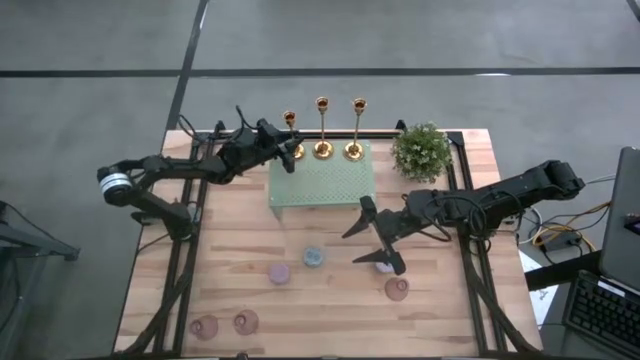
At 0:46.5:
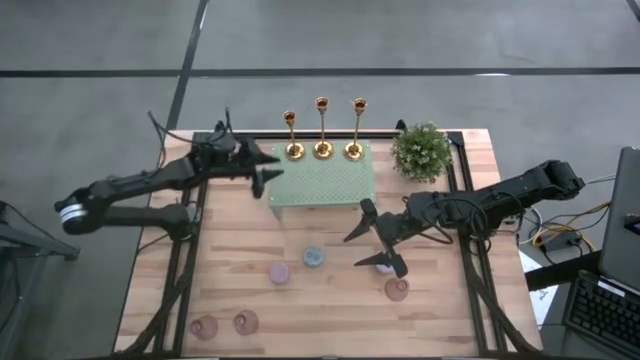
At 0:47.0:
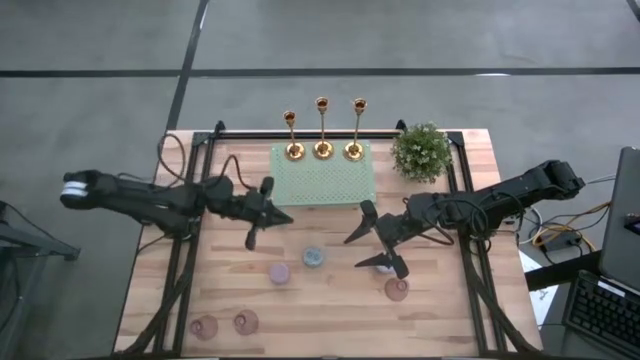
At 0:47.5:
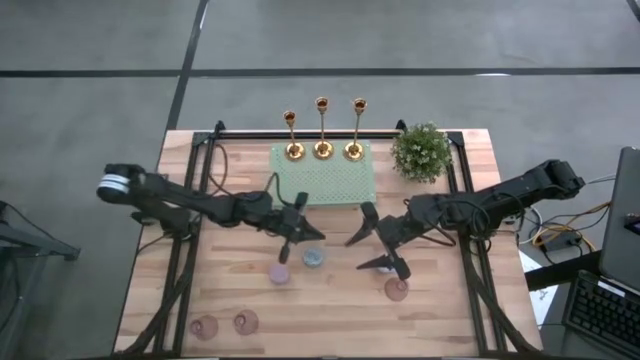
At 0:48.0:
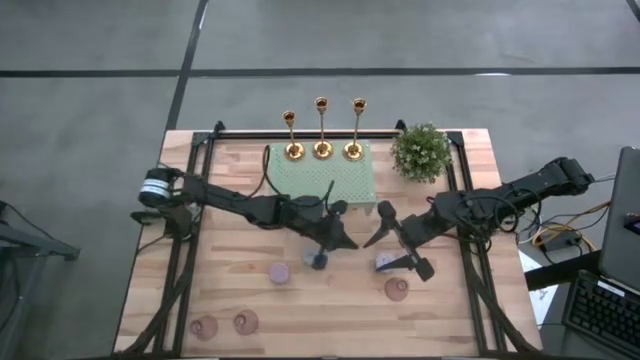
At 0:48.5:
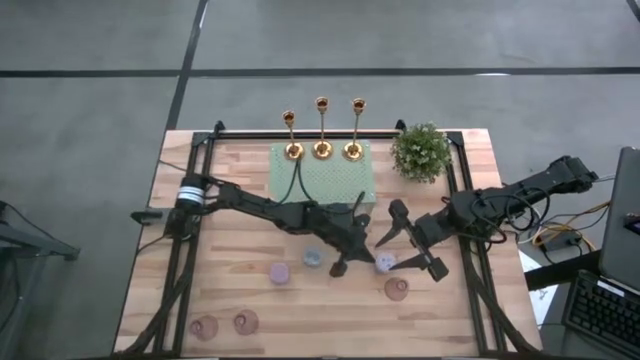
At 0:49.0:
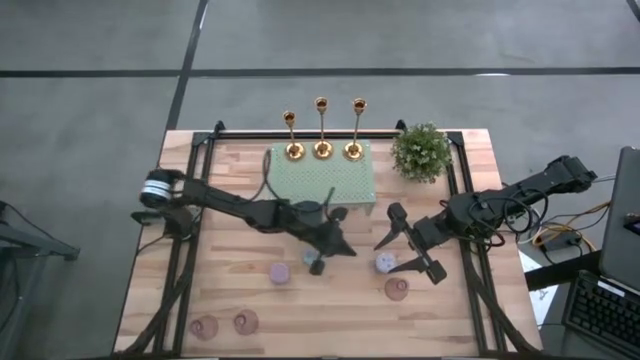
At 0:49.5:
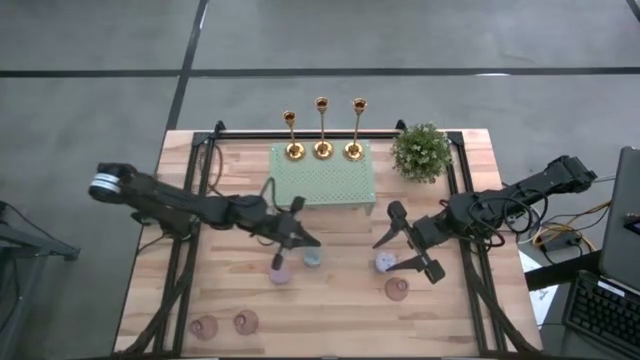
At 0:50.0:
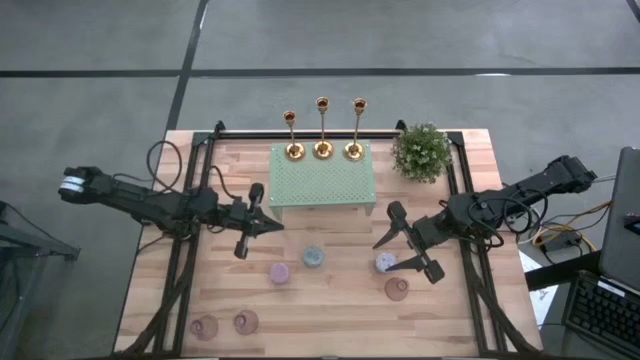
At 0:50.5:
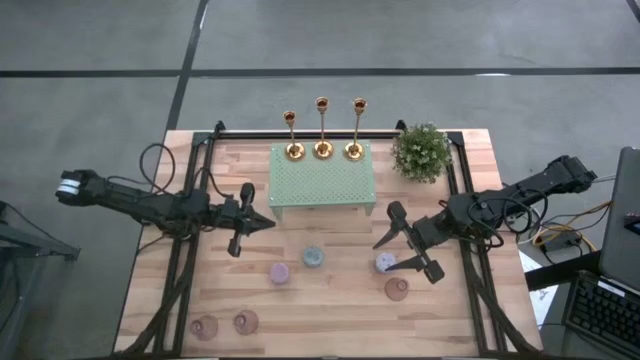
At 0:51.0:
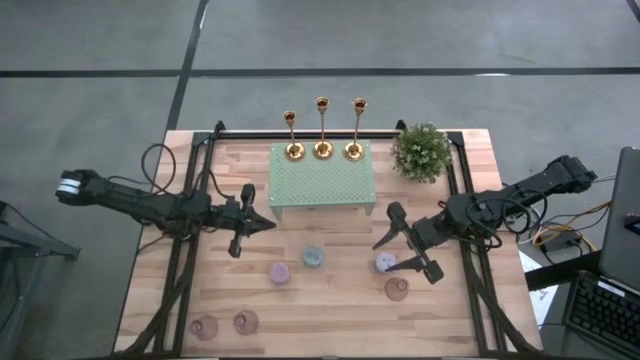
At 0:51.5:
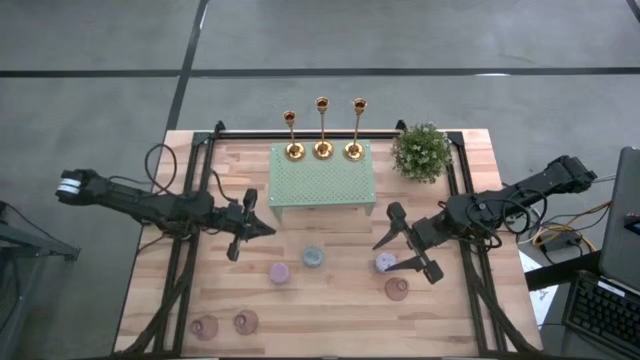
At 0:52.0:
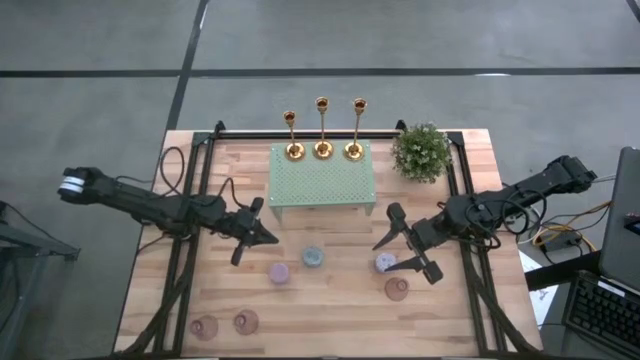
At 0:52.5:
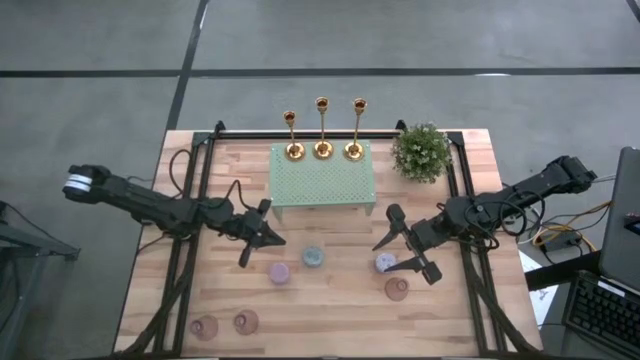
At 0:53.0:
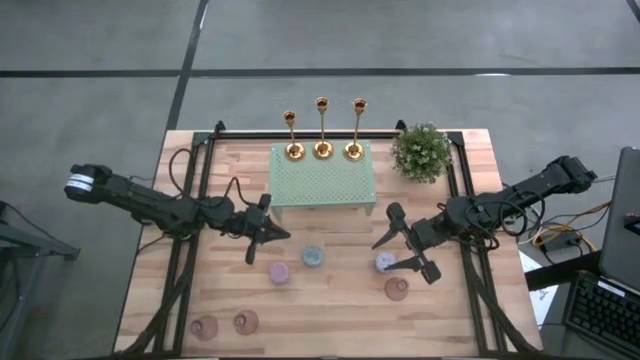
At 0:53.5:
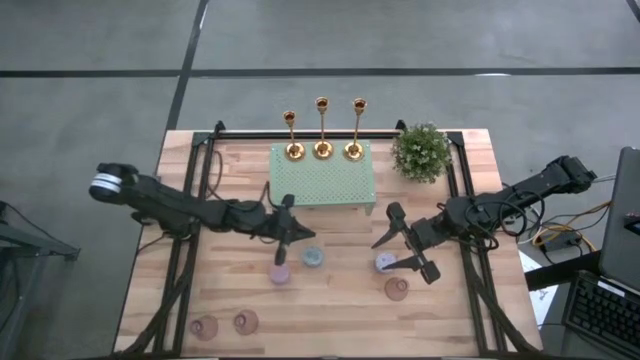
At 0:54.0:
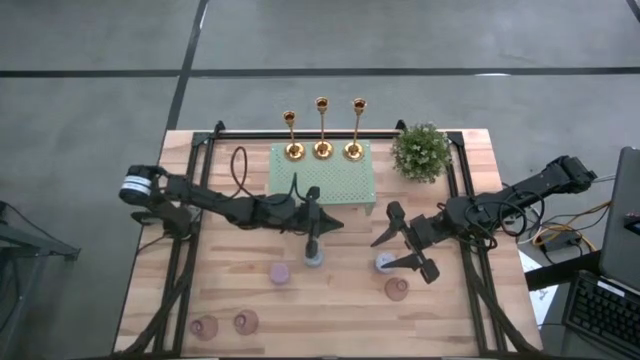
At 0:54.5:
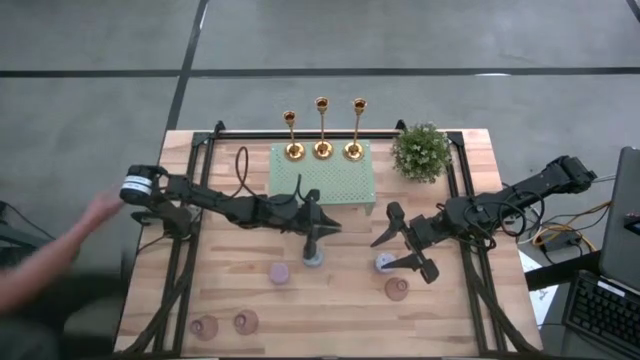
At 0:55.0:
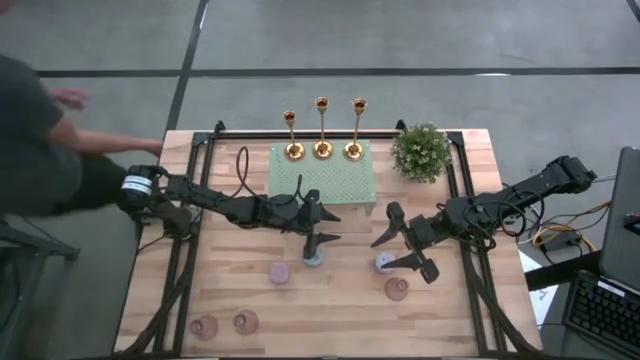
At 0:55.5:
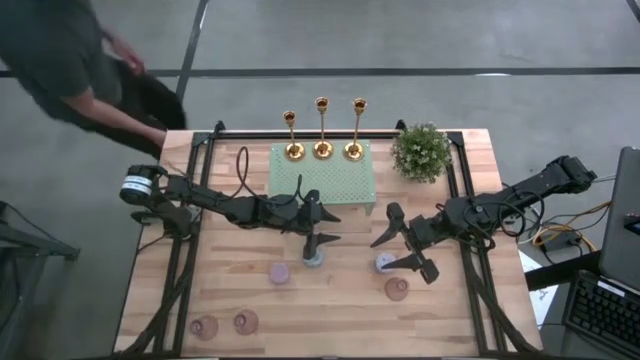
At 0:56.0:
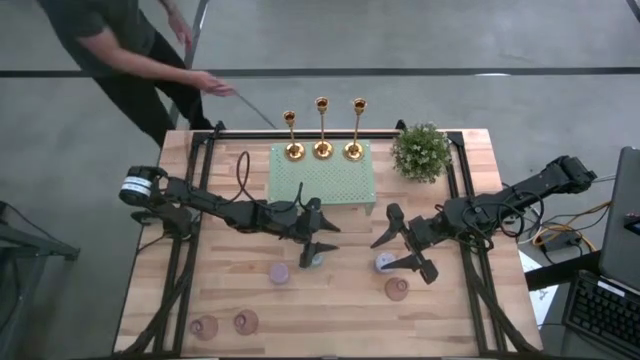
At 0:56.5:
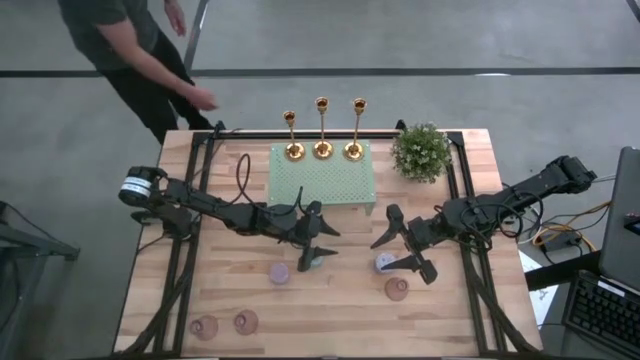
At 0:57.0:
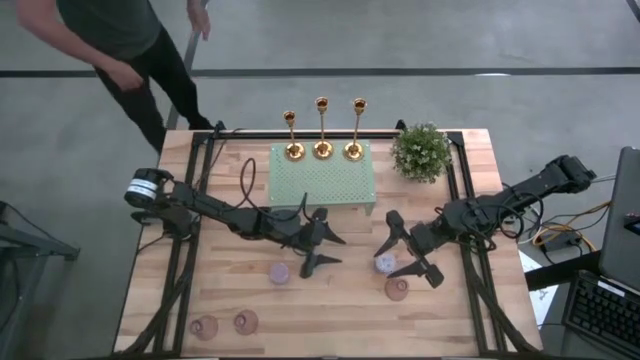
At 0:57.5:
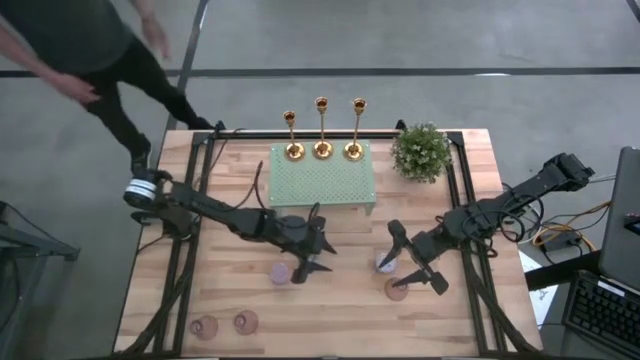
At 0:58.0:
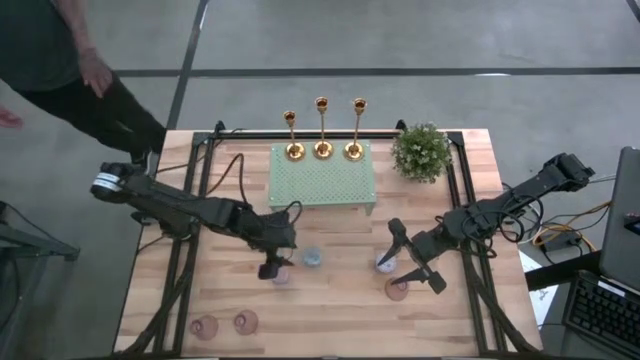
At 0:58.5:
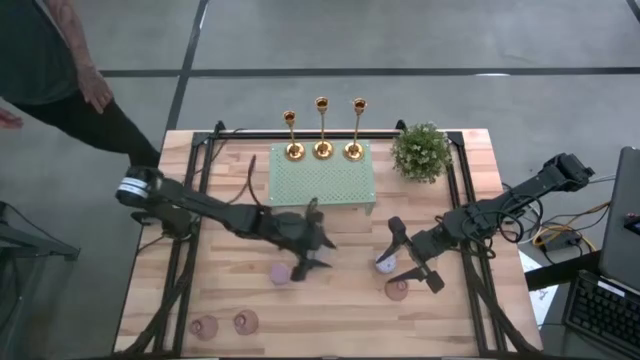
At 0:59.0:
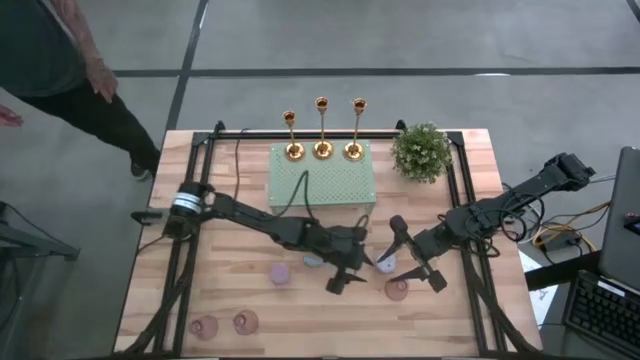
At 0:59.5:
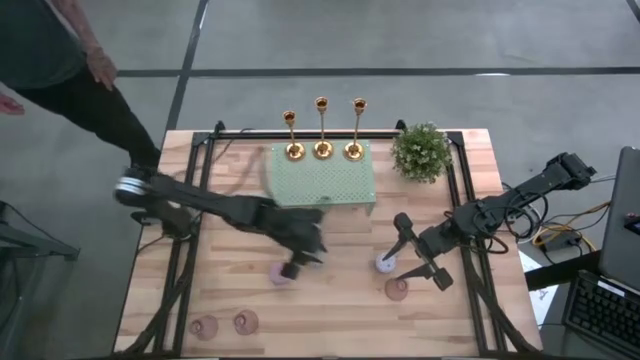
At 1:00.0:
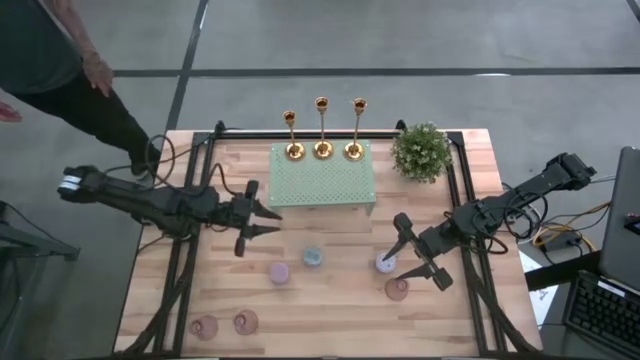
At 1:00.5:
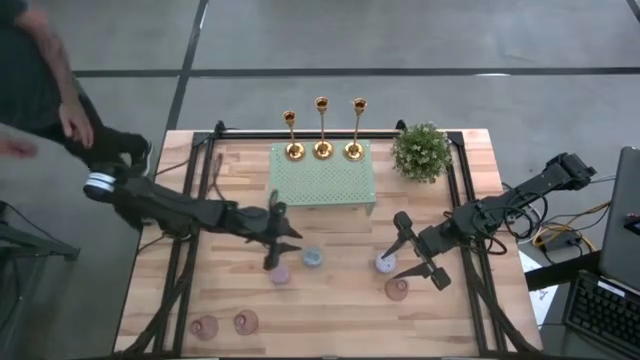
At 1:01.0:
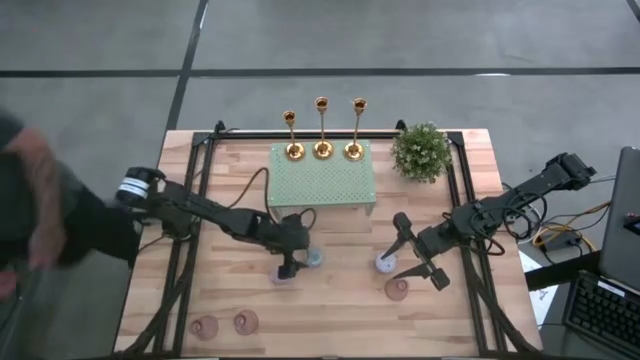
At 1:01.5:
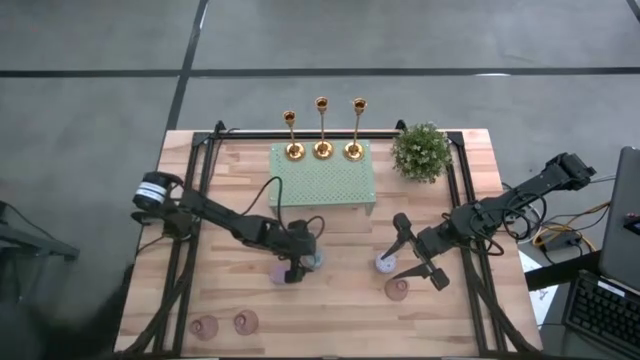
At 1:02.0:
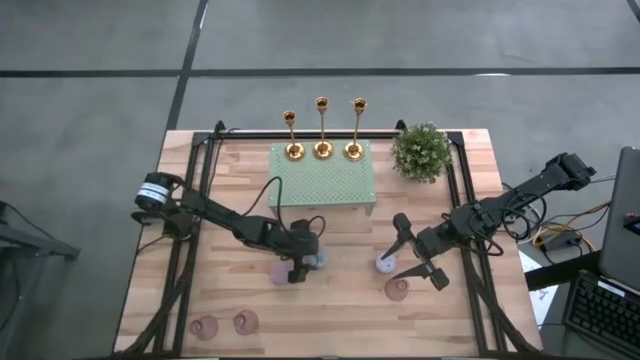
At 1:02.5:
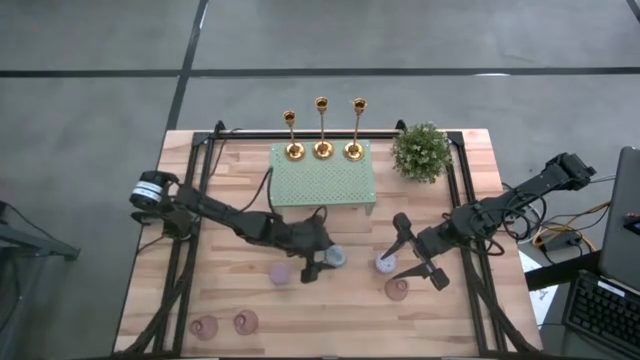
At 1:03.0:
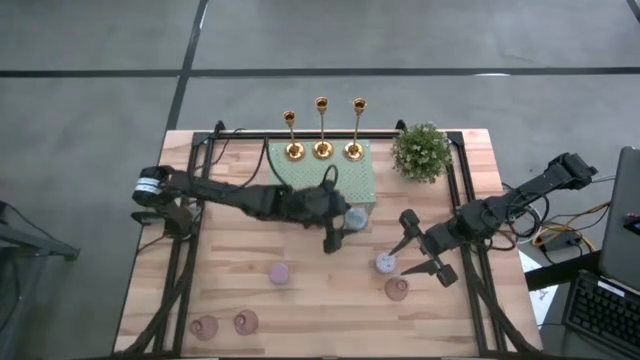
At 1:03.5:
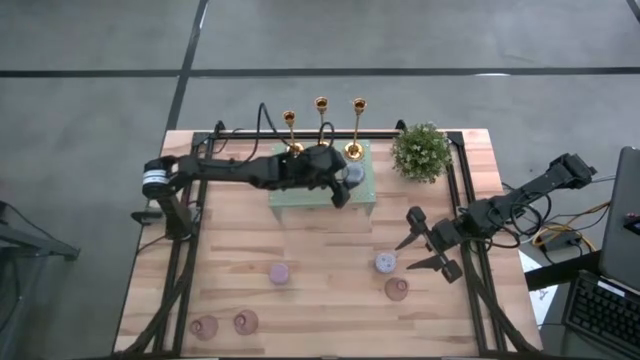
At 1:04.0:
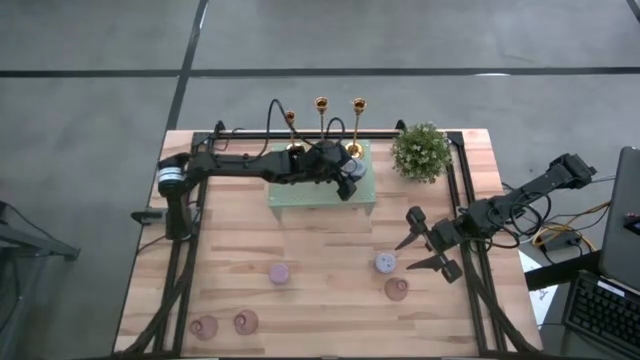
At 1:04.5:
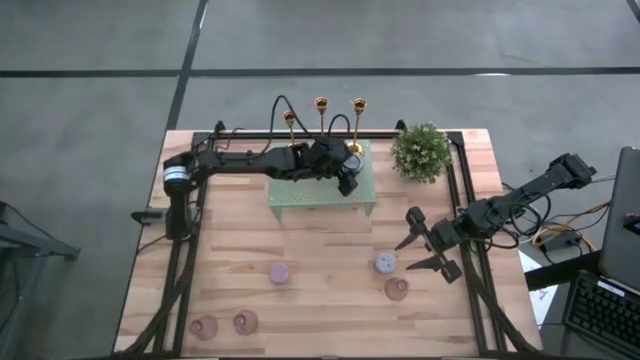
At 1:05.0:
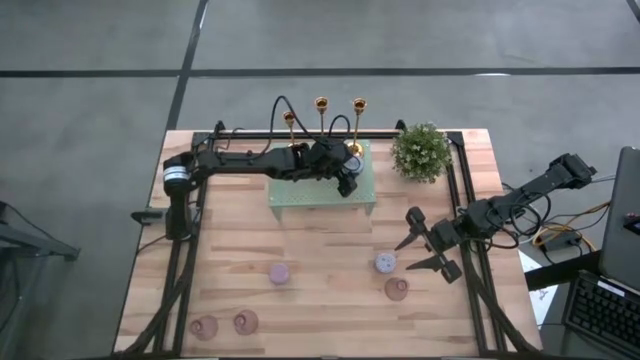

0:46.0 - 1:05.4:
Task: Pick & Place candle stick holders
Put the blue scented candle on the shelf

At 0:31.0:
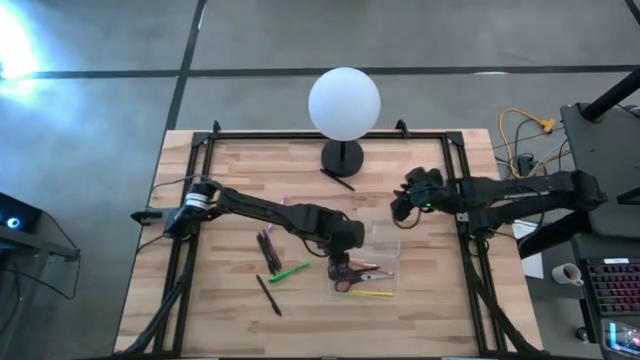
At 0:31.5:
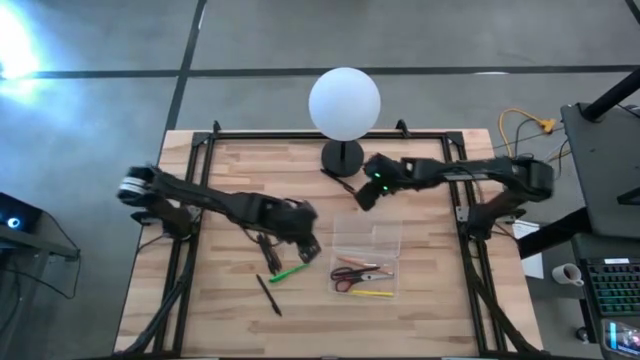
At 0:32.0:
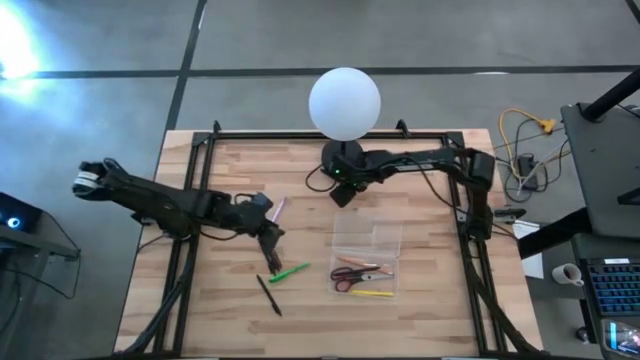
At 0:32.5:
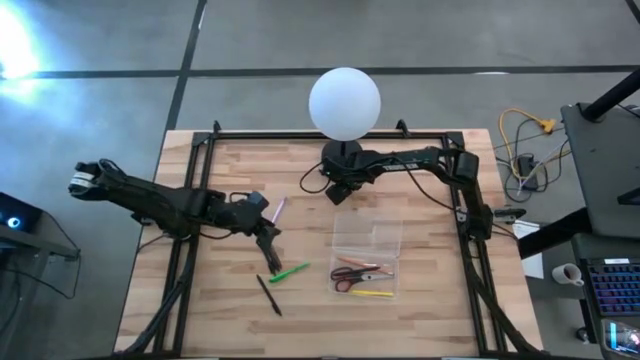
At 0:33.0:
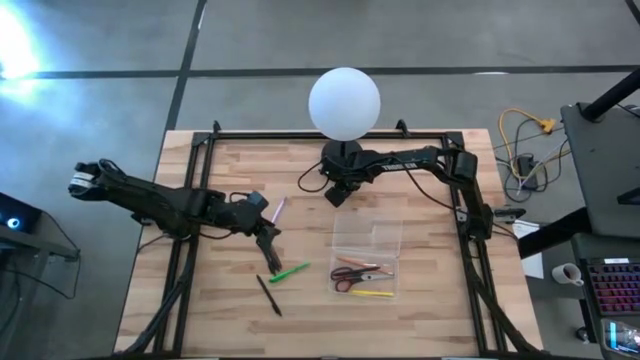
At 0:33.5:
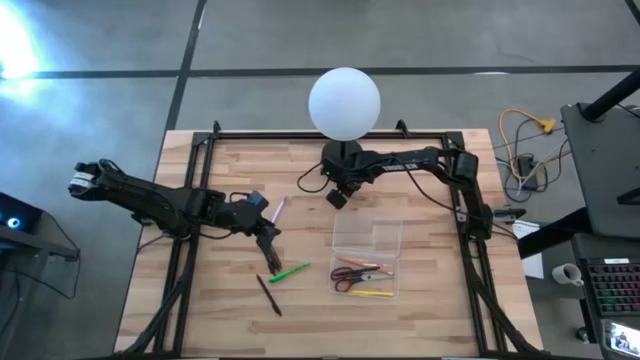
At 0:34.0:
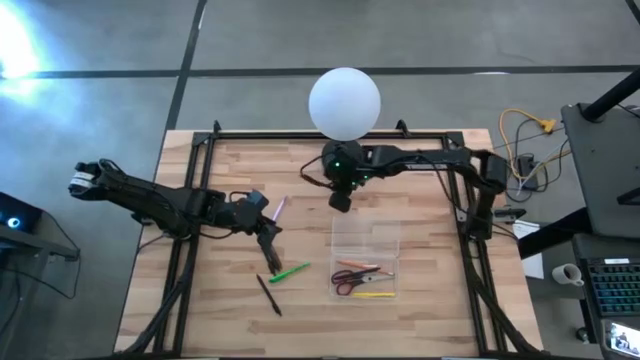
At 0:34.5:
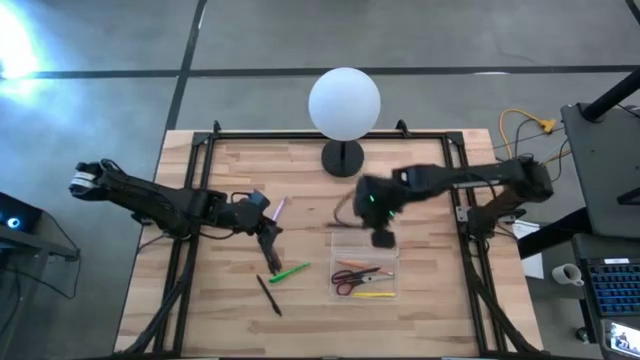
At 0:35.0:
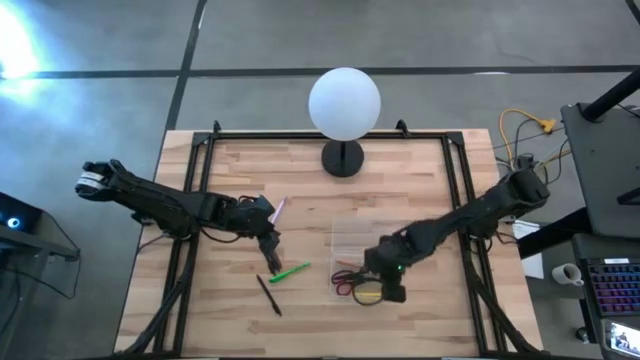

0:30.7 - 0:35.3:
Task: Pick & place school supplies into a supply box
Put the black pen into the transparent supply box
